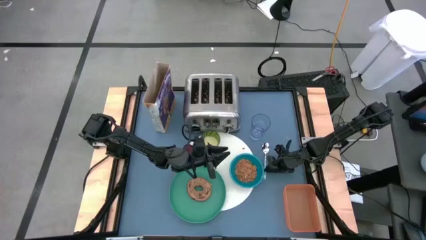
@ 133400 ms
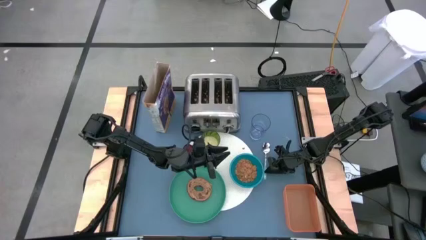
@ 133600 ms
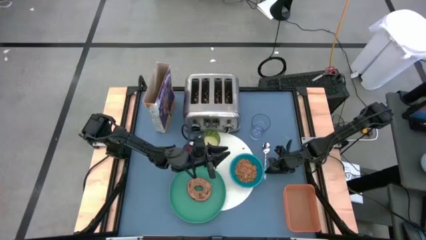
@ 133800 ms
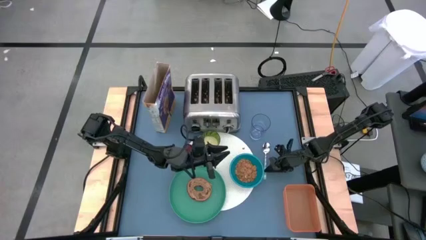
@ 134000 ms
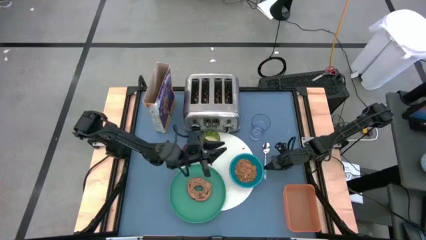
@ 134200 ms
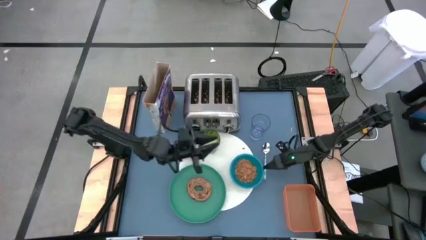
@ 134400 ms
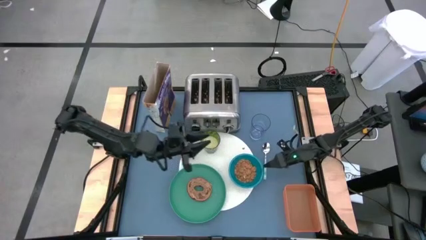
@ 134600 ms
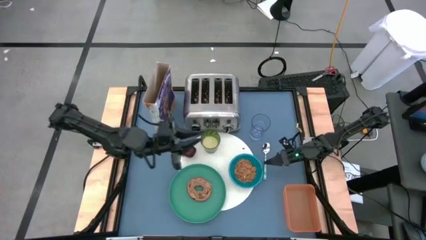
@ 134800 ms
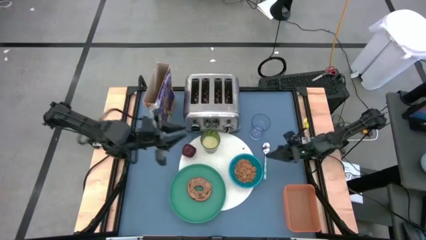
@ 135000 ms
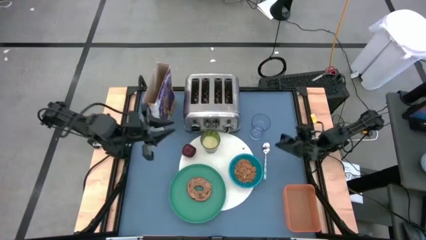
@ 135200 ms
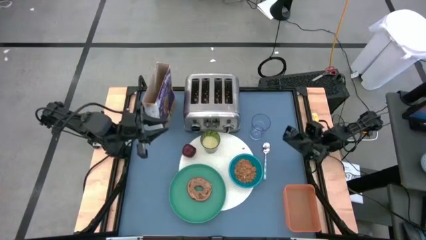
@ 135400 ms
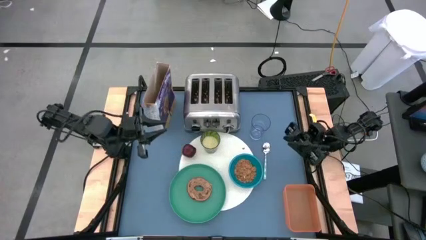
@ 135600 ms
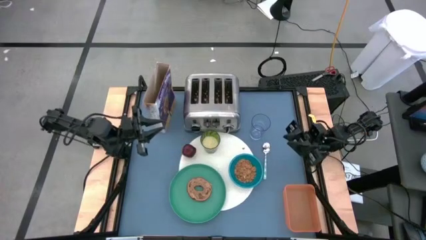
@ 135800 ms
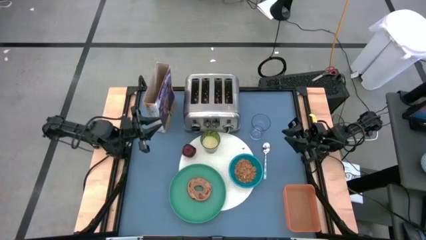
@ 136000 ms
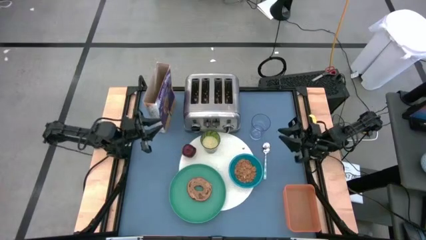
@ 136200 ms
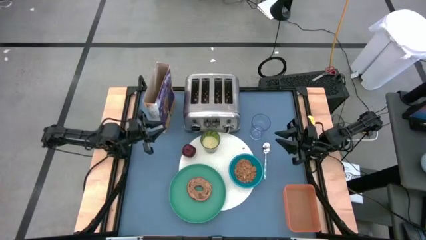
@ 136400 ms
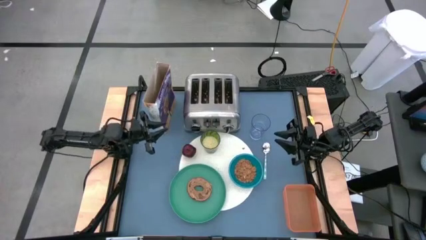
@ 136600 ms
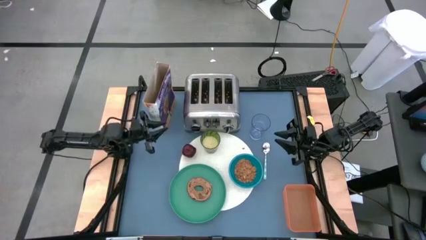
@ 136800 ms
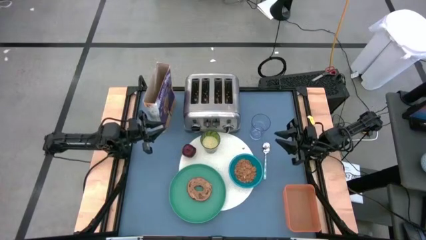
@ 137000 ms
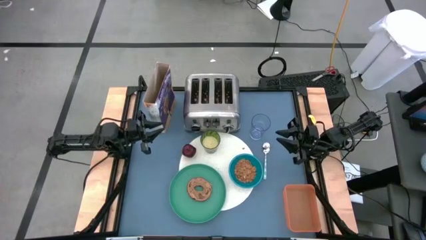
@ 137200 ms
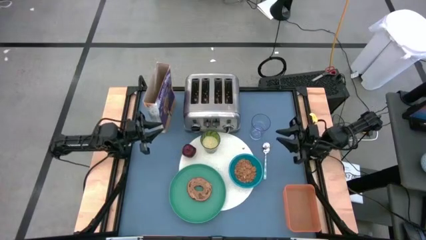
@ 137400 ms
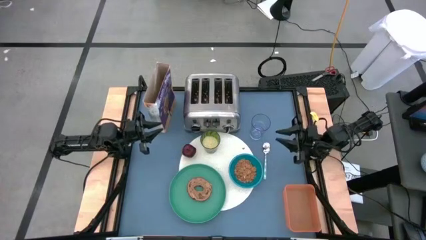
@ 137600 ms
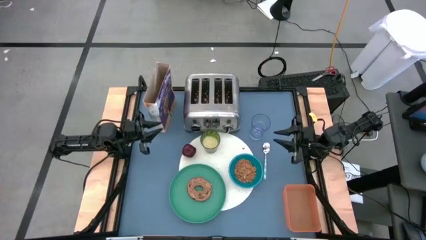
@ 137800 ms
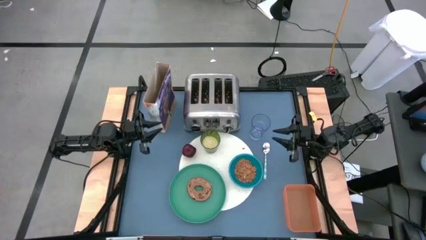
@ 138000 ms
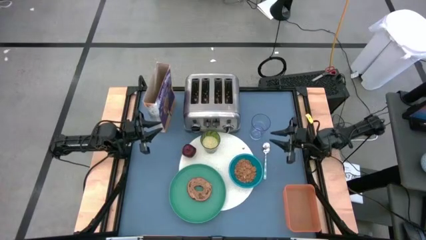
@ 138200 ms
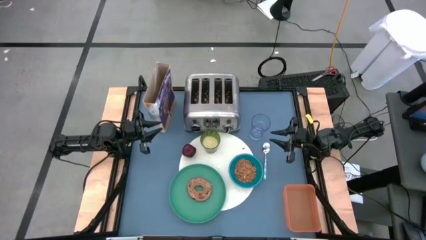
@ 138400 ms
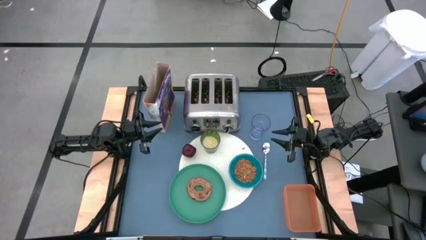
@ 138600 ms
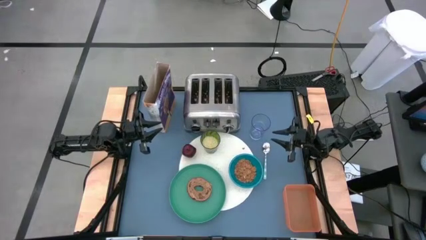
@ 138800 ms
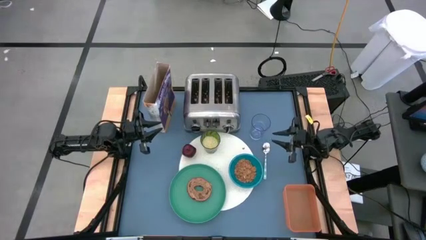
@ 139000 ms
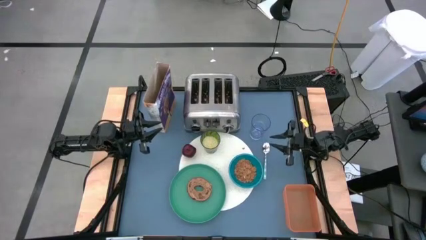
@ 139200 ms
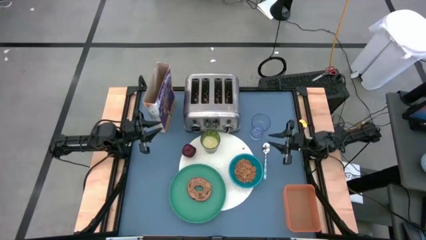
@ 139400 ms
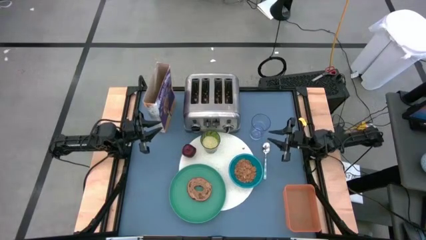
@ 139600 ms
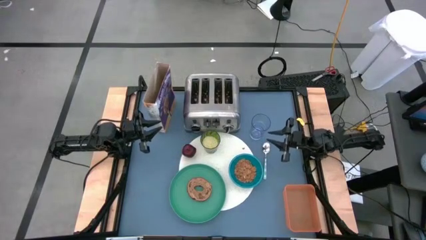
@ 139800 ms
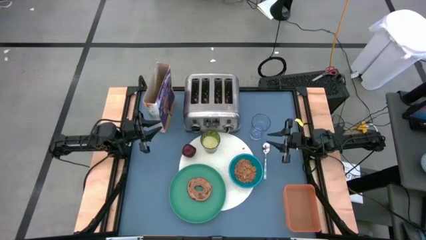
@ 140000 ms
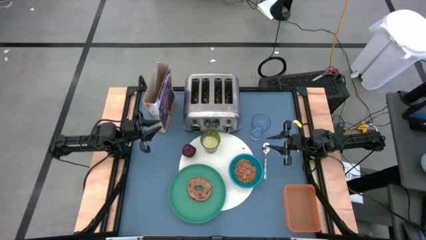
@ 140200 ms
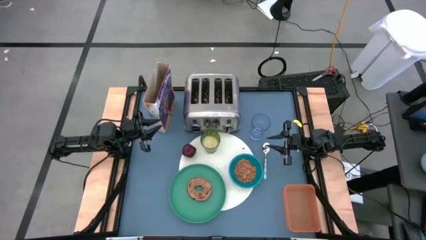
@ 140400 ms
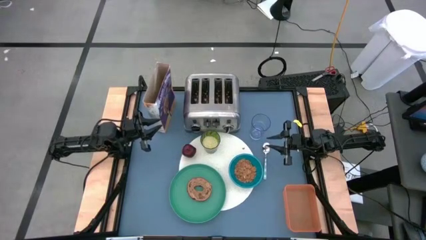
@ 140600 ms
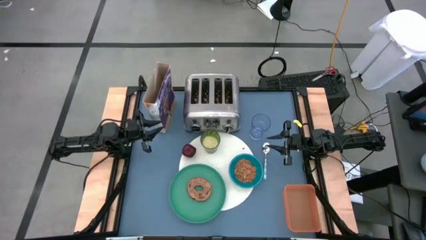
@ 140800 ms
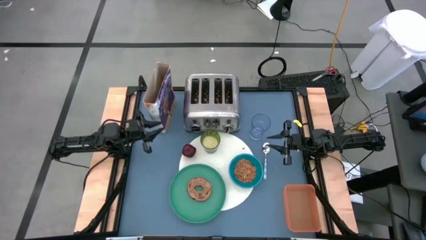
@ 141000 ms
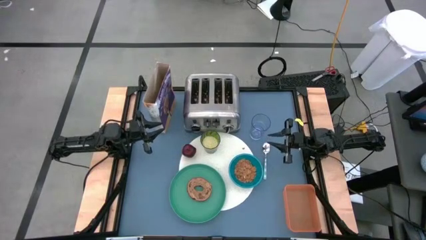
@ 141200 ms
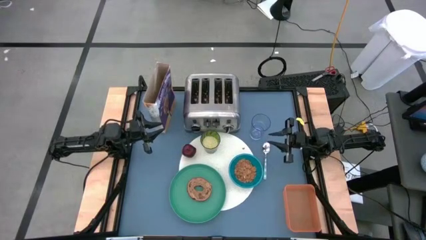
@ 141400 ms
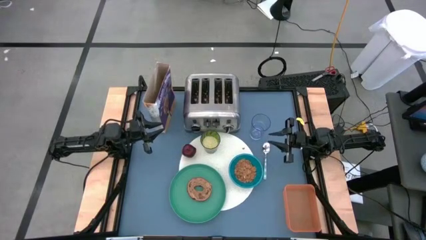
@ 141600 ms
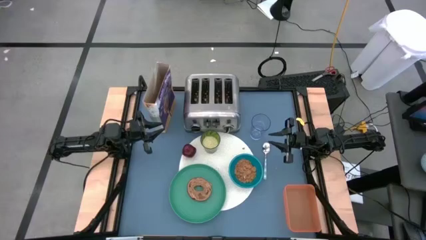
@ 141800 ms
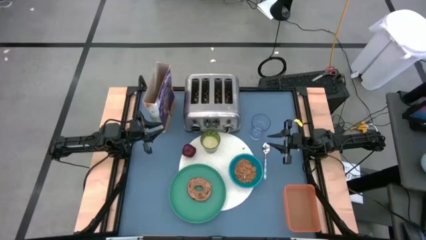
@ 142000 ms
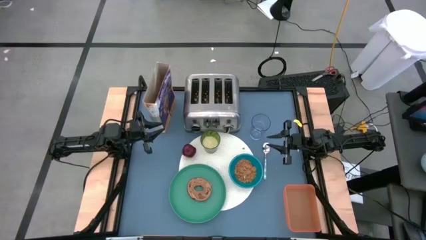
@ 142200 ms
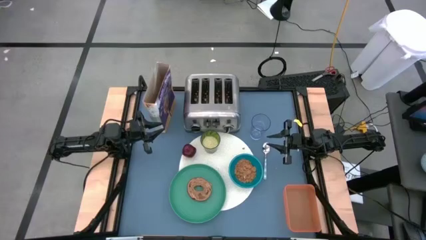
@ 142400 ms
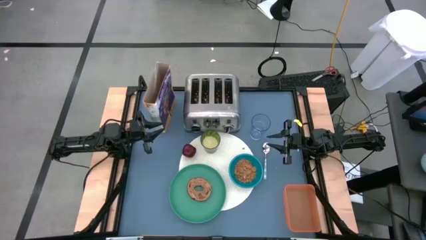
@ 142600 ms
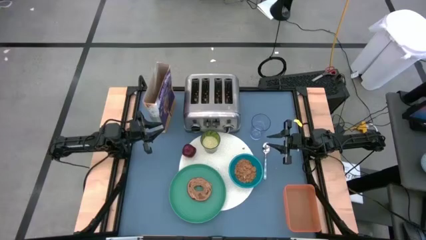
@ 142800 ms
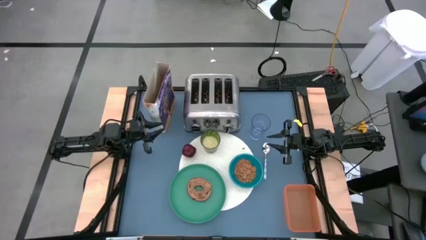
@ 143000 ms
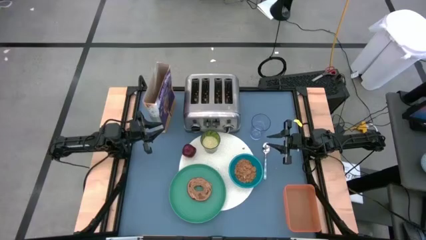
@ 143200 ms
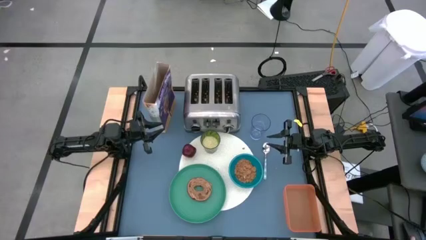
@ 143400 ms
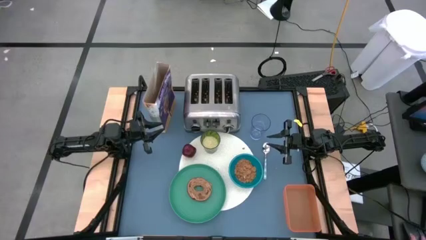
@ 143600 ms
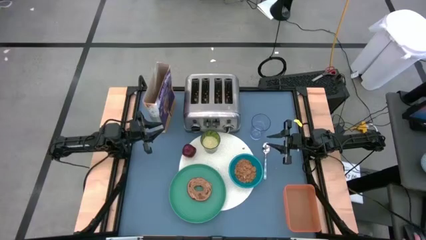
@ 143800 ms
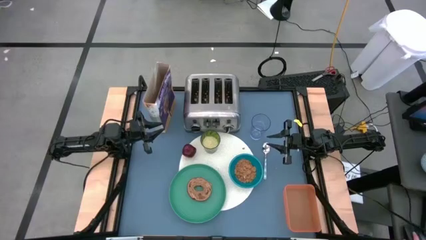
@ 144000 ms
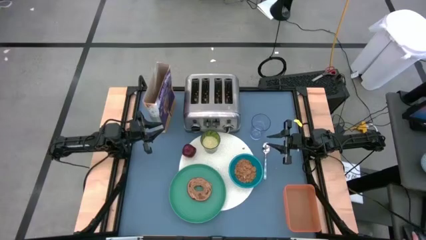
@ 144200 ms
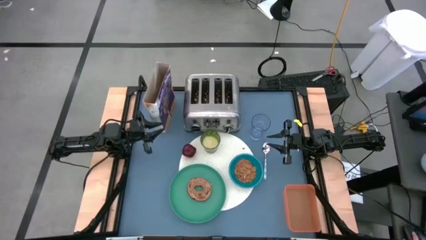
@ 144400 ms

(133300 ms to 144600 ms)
Task: Arrange a breakfast setting
Return to Home Position

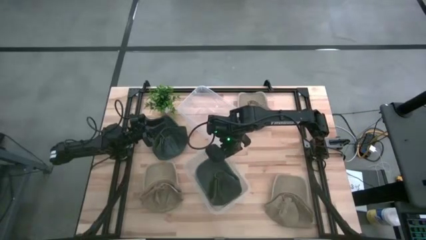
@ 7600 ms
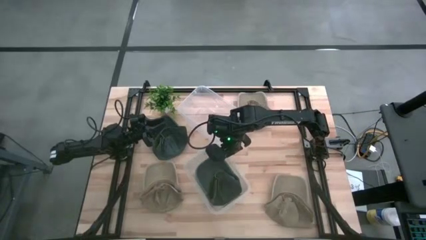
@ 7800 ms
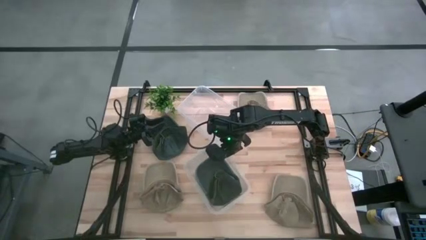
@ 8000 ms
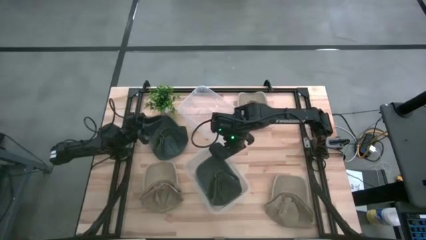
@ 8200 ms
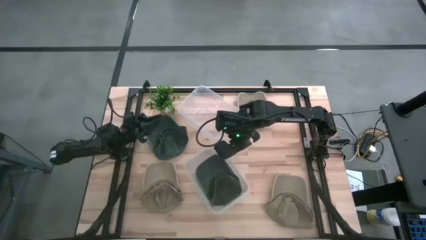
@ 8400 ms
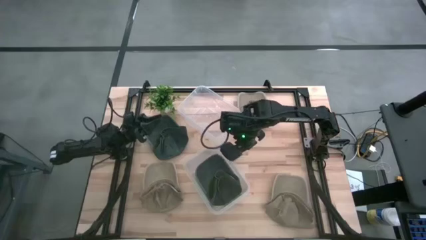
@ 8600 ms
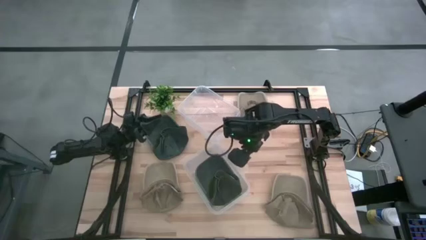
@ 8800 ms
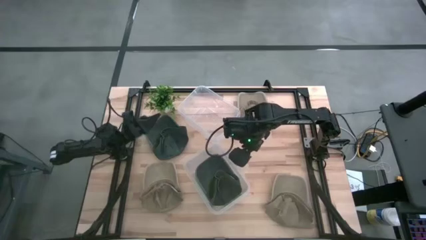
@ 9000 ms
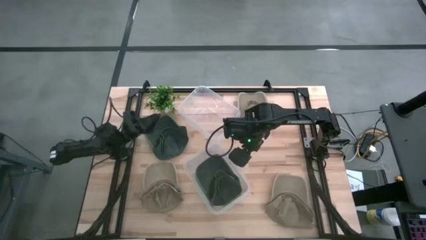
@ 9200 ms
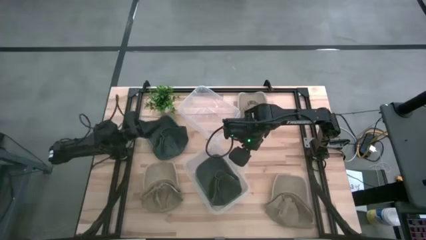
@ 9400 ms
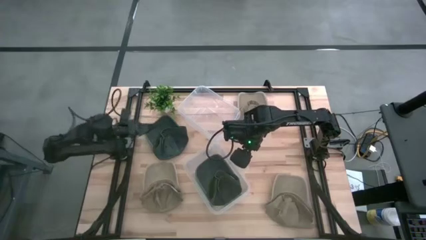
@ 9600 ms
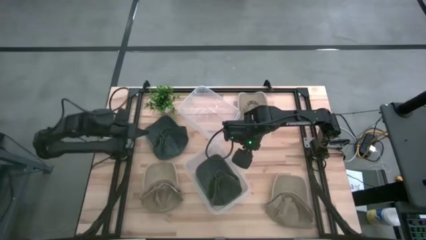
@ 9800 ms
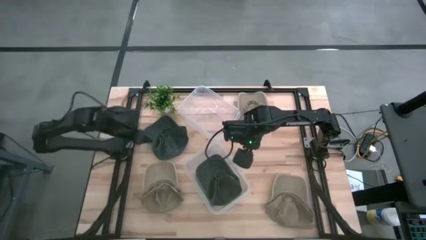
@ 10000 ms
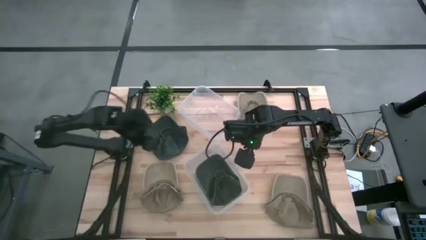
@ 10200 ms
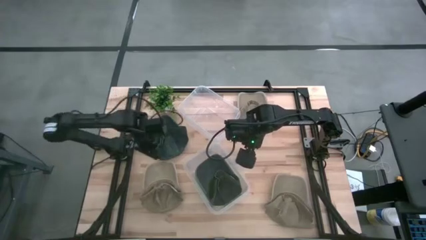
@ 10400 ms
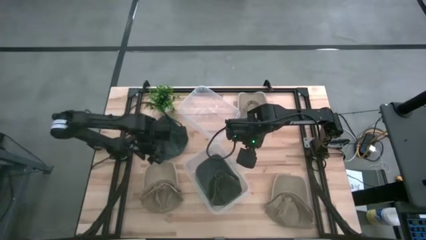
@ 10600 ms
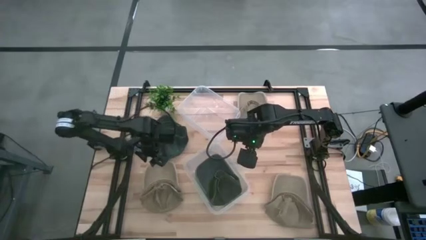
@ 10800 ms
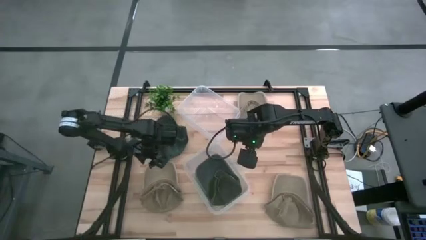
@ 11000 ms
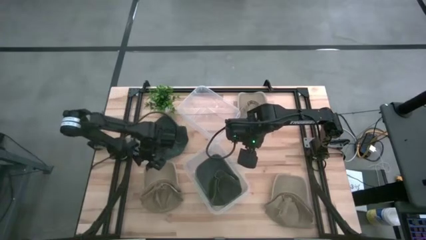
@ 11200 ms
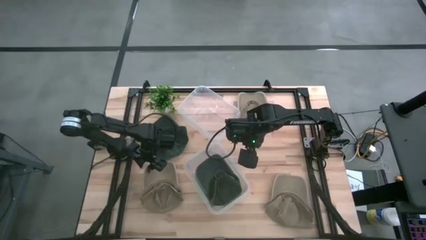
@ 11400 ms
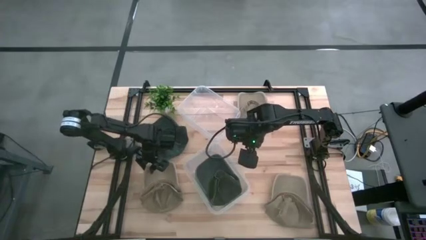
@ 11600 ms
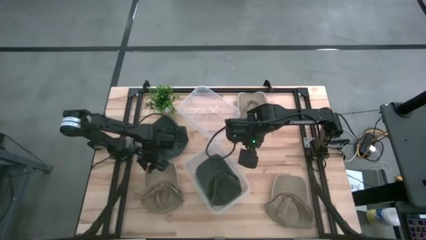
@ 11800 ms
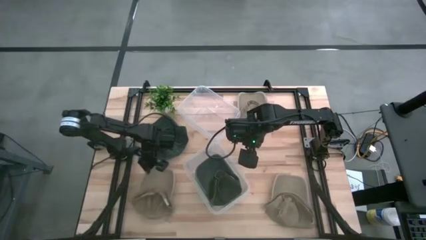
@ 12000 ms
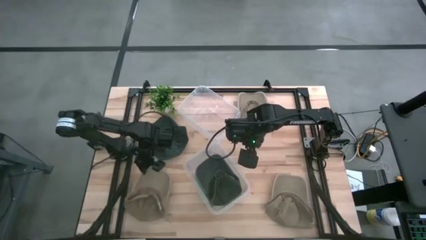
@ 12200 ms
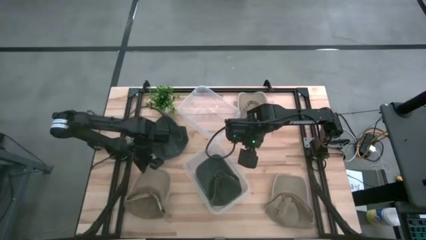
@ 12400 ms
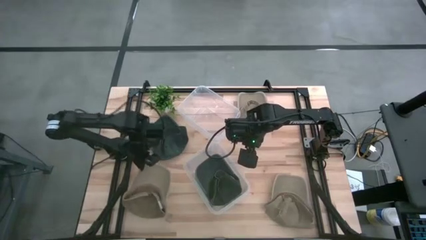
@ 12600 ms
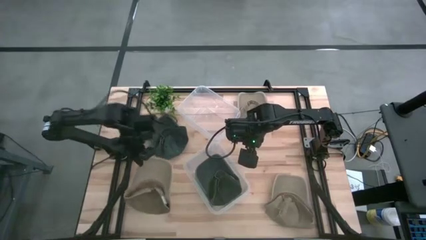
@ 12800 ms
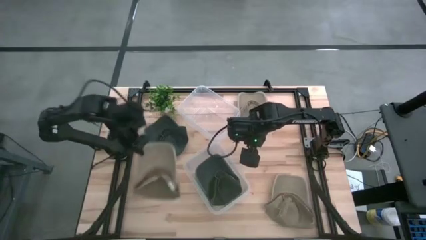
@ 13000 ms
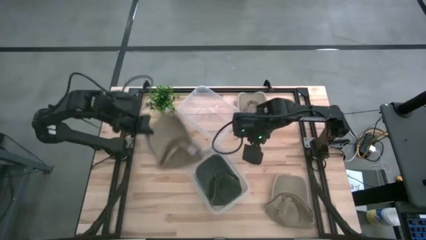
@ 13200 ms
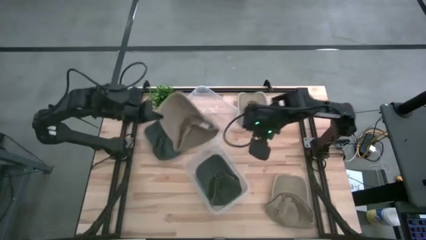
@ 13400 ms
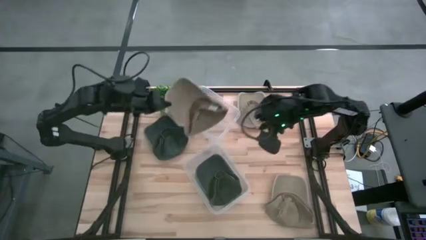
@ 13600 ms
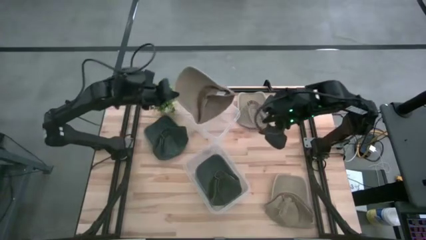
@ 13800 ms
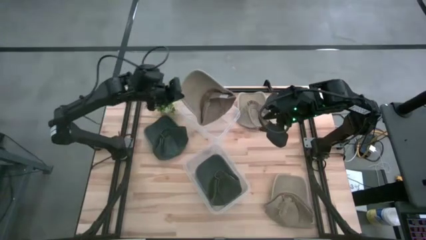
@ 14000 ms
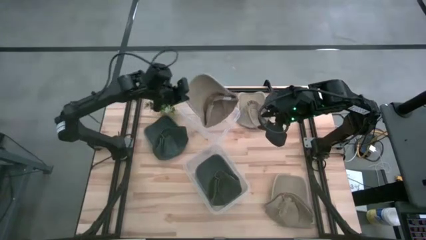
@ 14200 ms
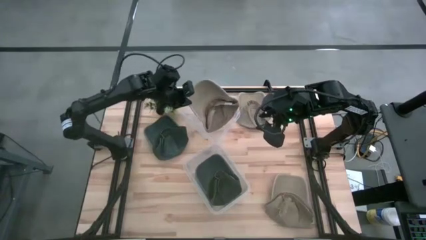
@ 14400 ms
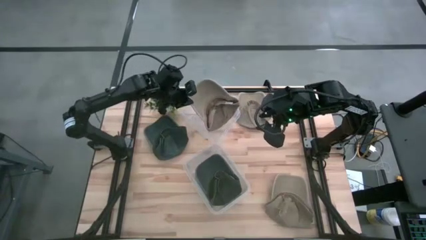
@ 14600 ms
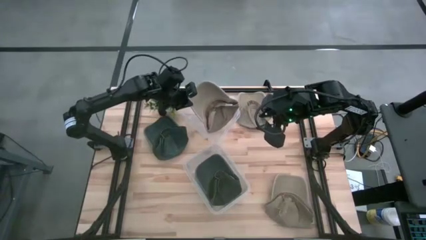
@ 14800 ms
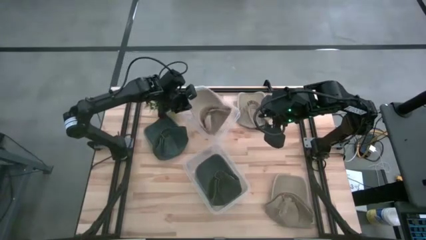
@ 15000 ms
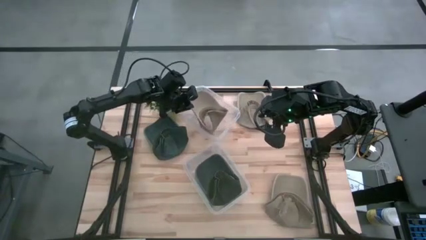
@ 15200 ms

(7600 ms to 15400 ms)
Task: Pick & Place hat
Put the left brown cap into the top transparent bin
